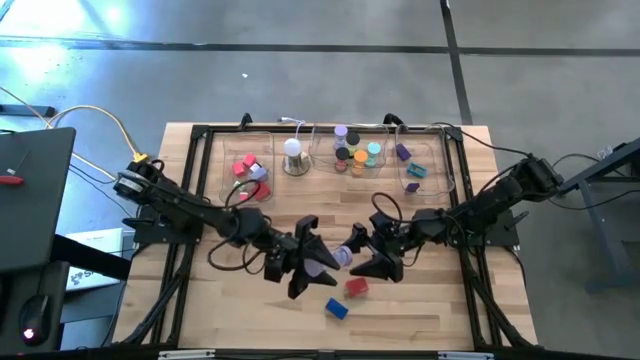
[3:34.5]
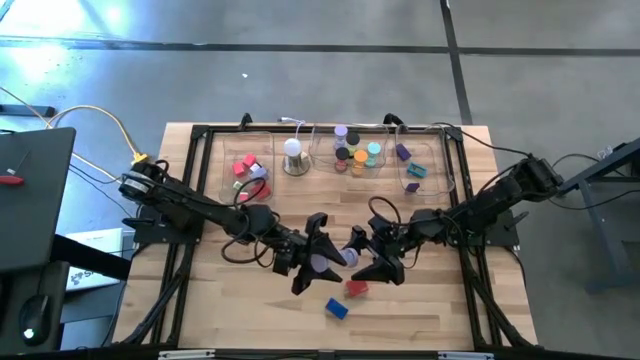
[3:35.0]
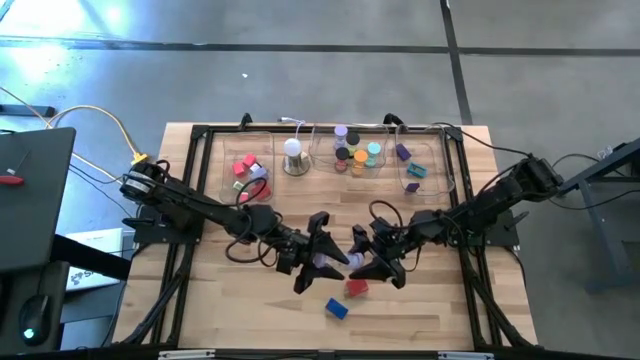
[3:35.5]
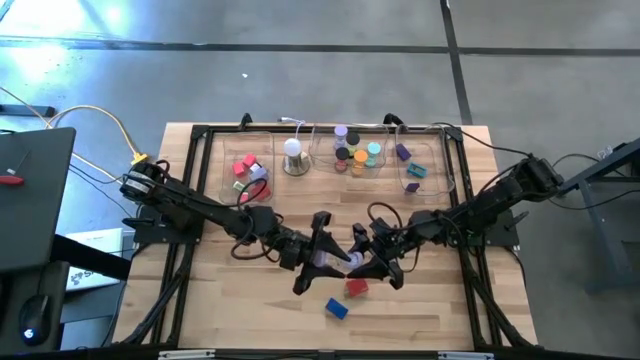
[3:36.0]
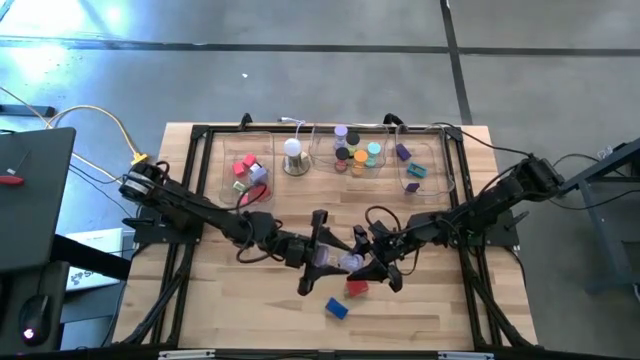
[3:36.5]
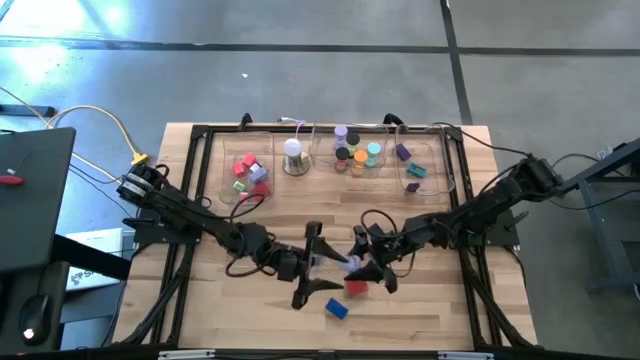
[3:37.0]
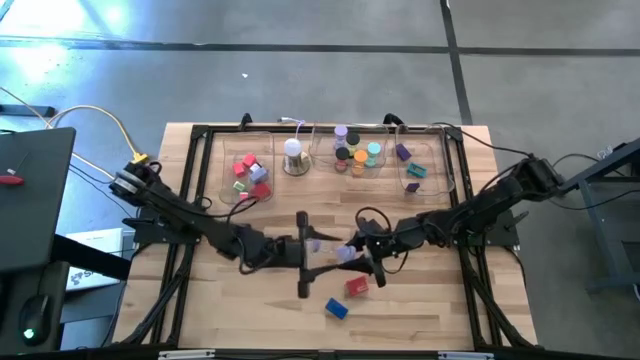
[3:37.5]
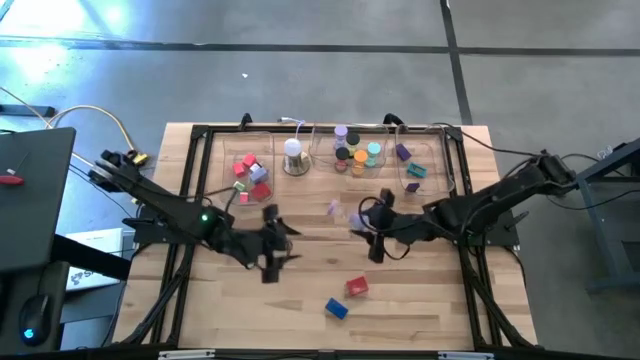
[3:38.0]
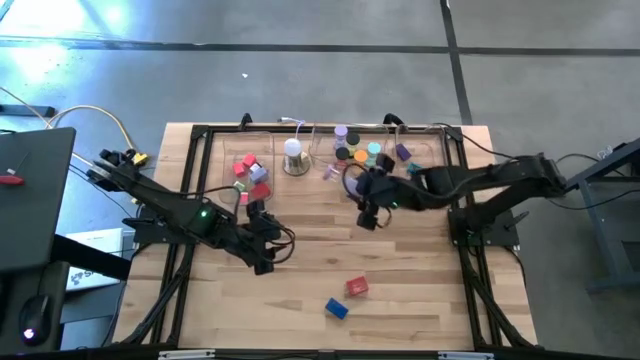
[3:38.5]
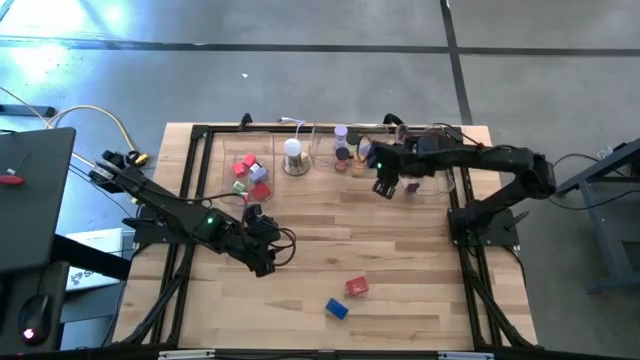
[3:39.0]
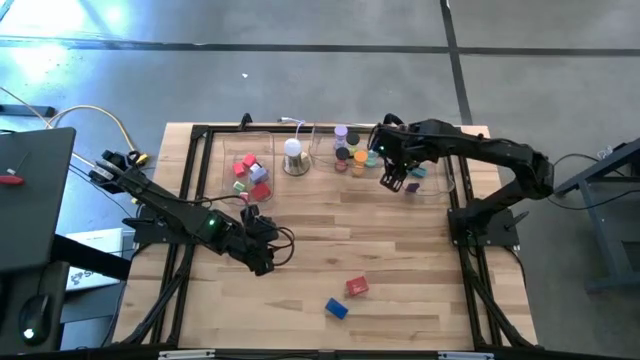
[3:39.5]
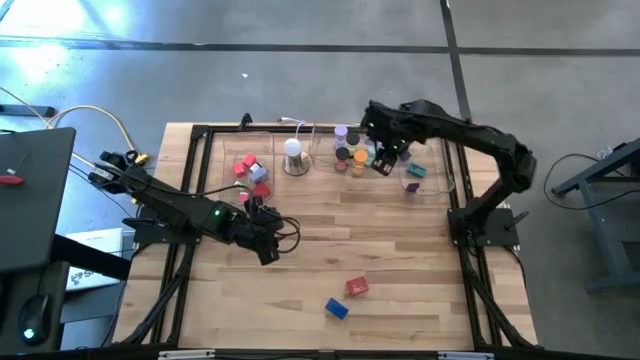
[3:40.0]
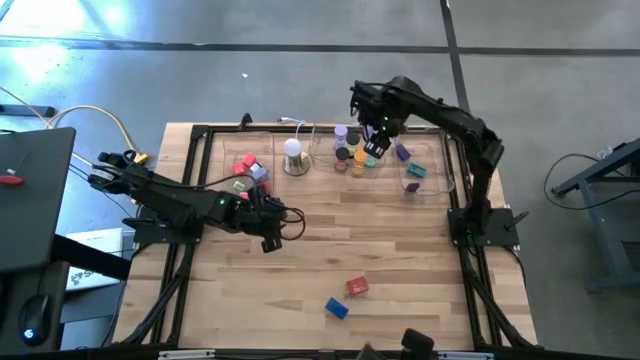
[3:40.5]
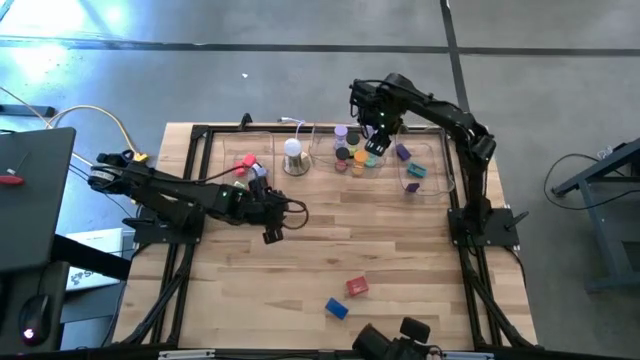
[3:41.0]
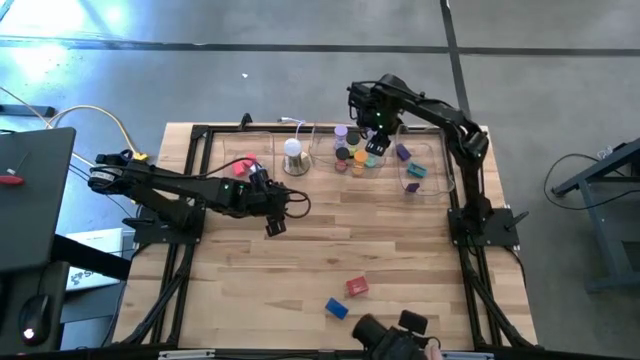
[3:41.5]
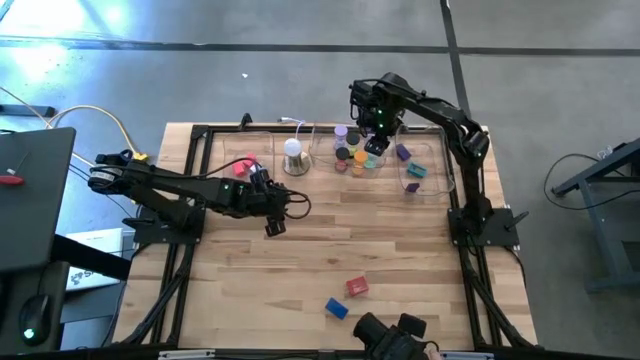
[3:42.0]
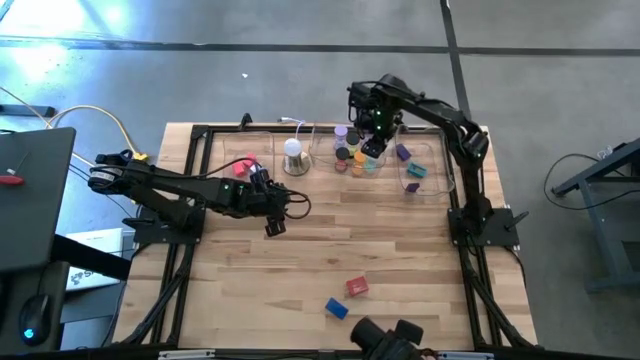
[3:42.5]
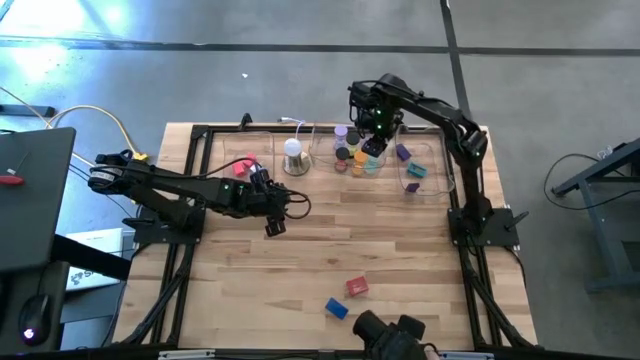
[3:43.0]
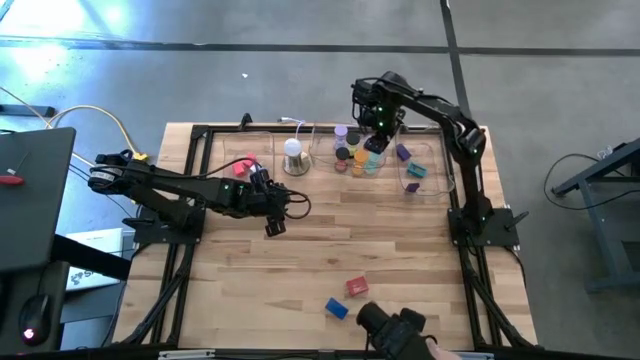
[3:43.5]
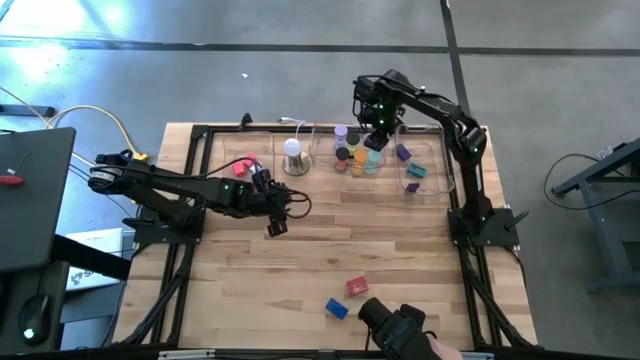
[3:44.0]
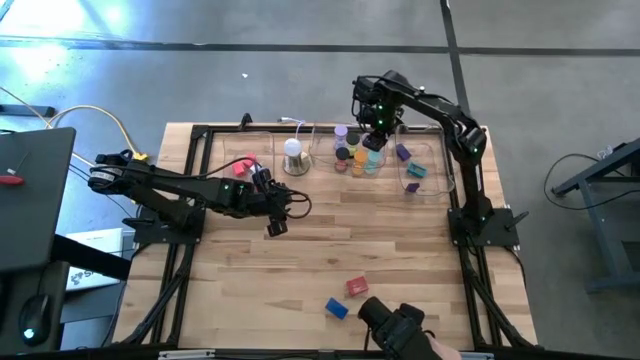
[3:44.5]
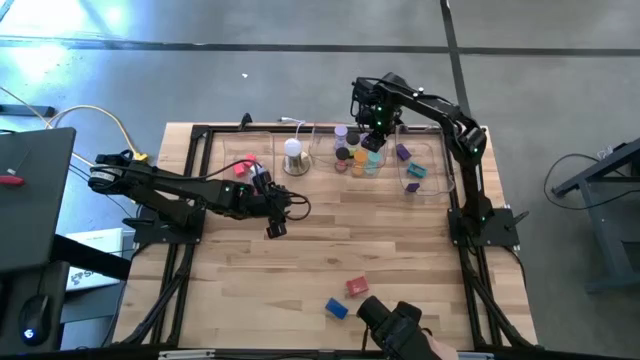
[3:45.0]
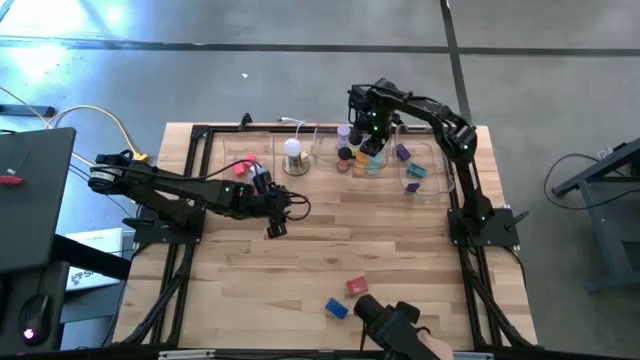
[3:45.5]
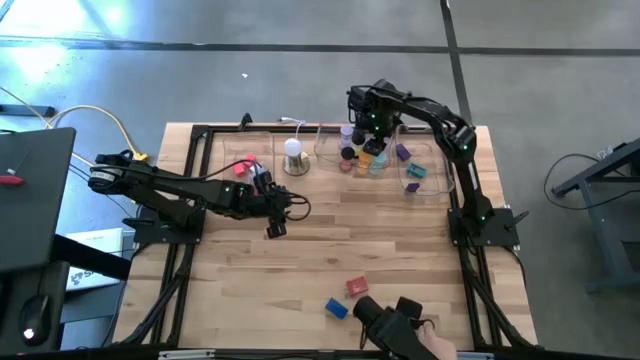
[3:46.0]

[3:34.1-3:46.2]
Task: Pick & Place Office items
Put the purple hourglass into the middle transparent bin

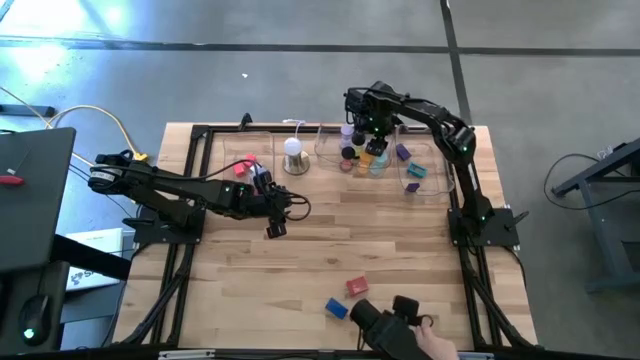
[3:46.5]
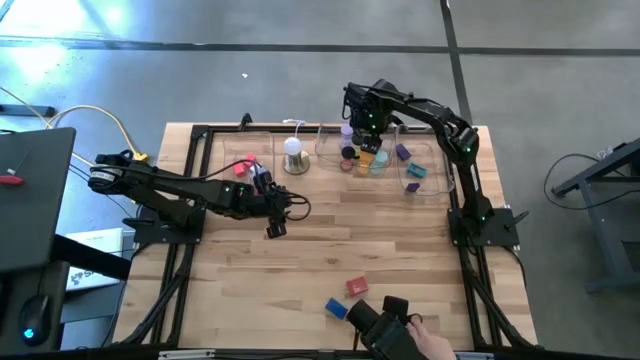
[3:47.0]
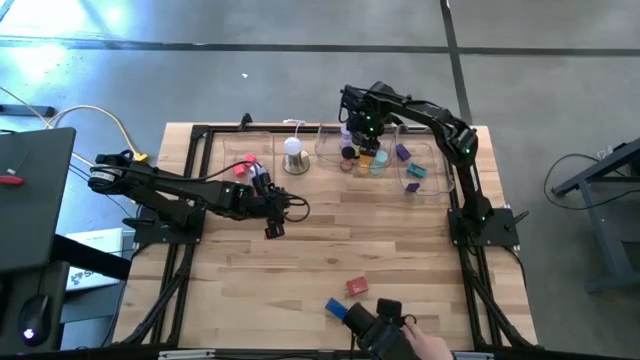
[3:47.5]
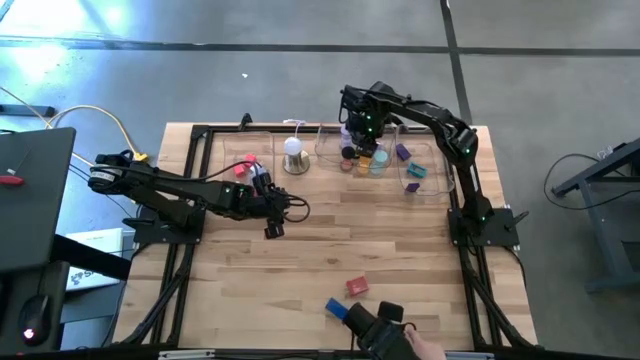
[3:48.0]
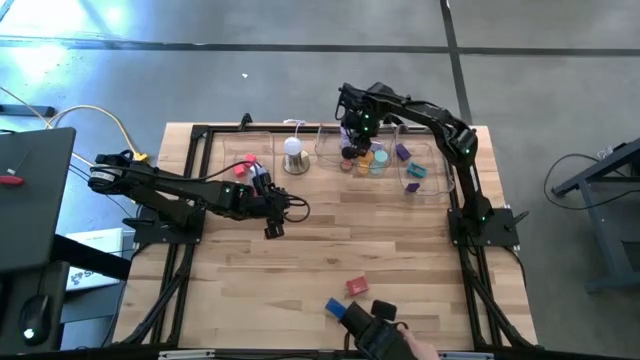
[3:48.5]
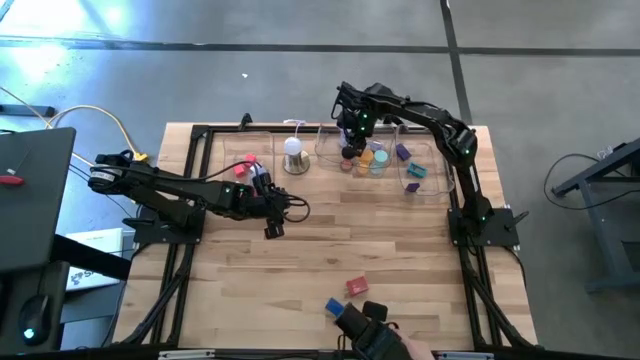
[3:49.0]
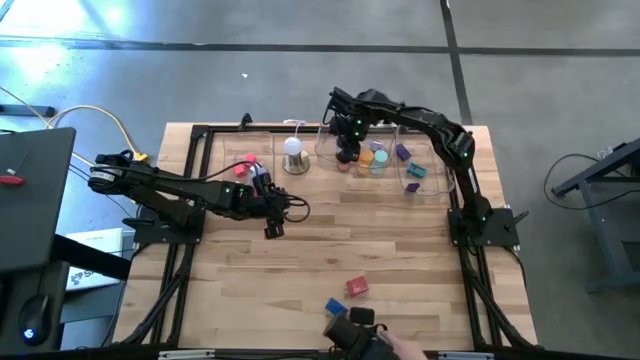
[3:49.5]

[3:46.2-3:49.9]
Adjust the green hourglass on the middle transparent bin

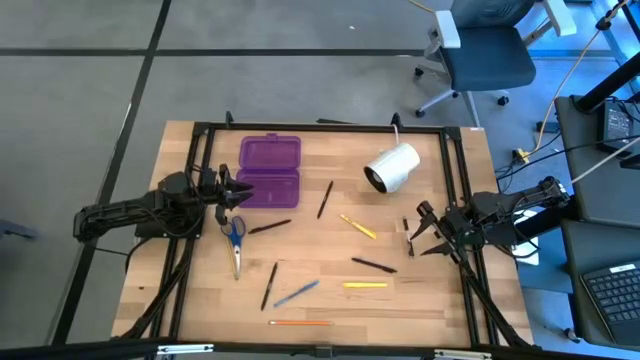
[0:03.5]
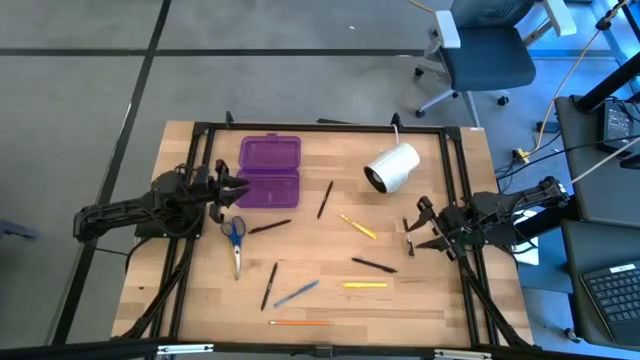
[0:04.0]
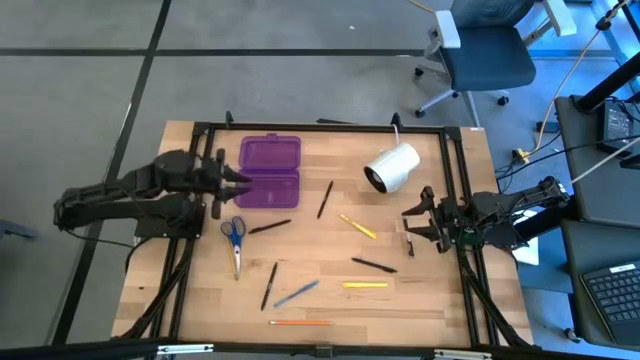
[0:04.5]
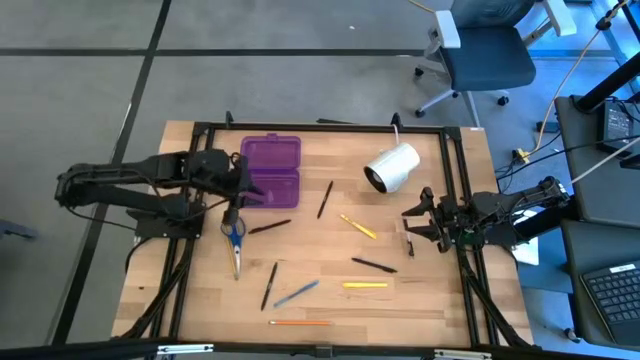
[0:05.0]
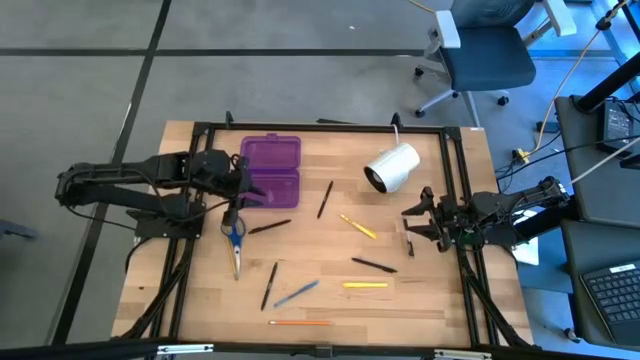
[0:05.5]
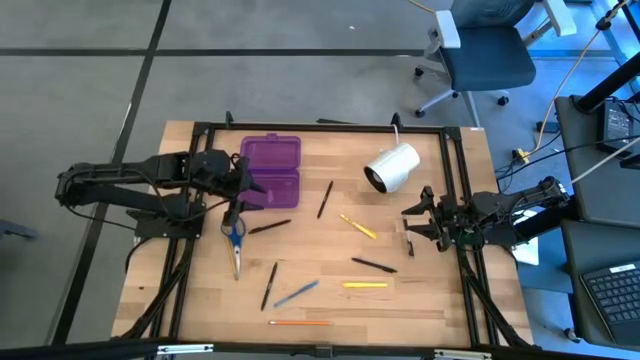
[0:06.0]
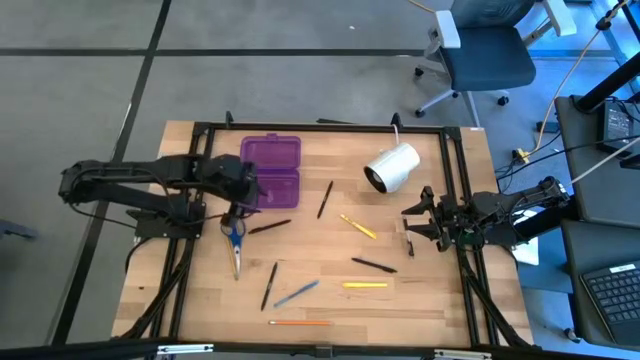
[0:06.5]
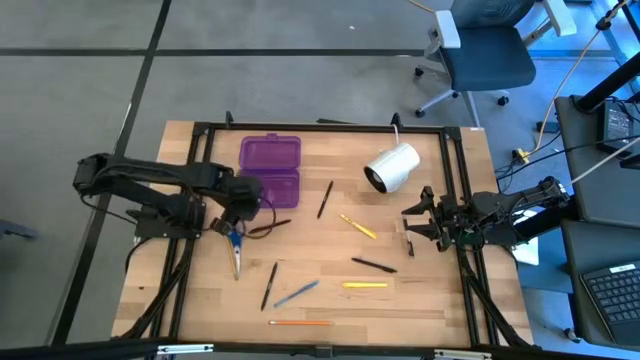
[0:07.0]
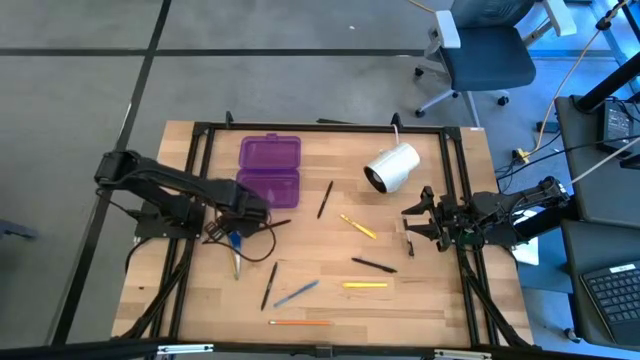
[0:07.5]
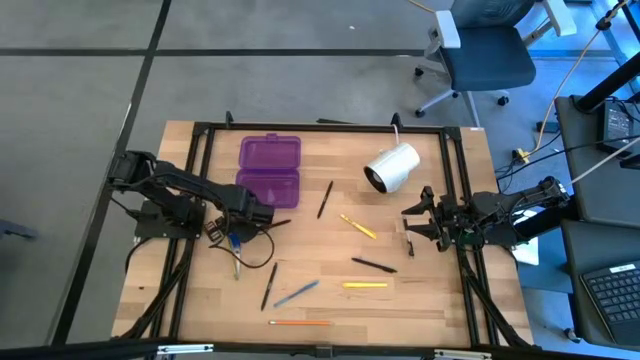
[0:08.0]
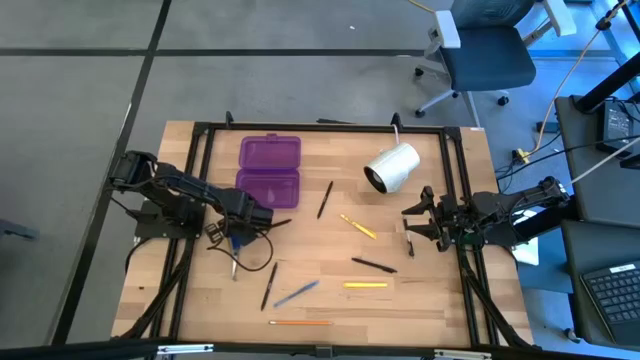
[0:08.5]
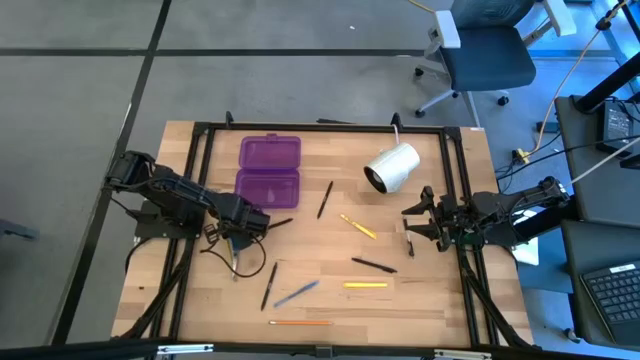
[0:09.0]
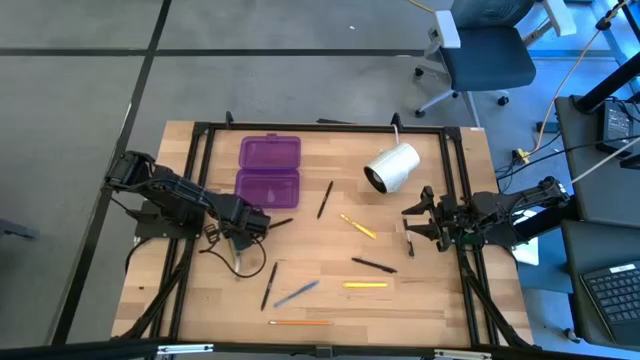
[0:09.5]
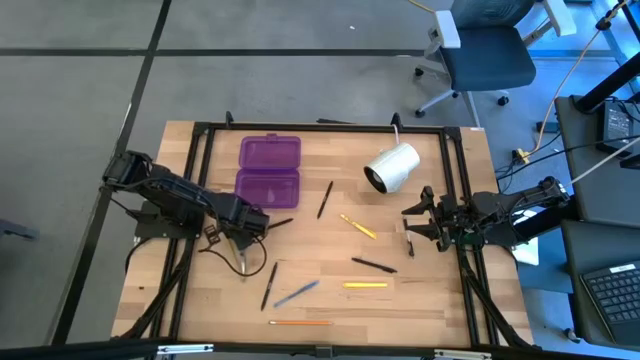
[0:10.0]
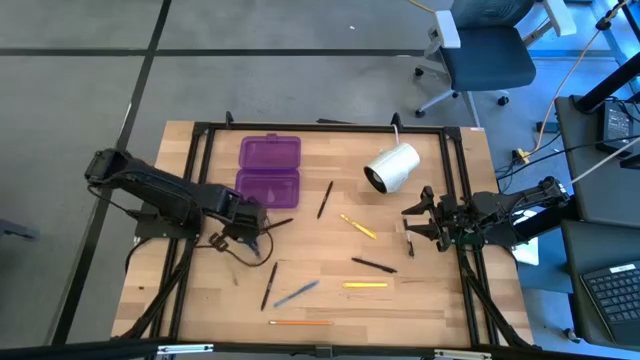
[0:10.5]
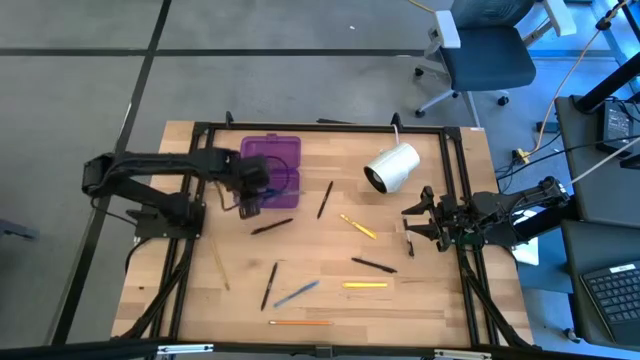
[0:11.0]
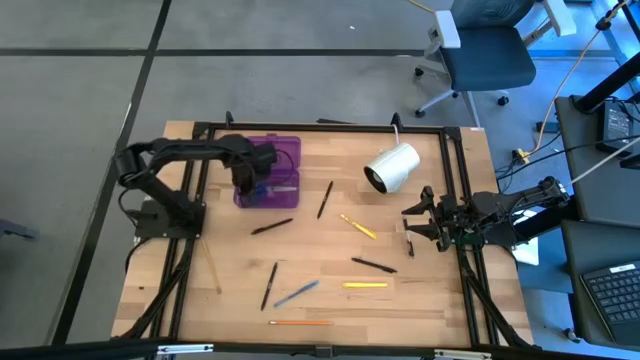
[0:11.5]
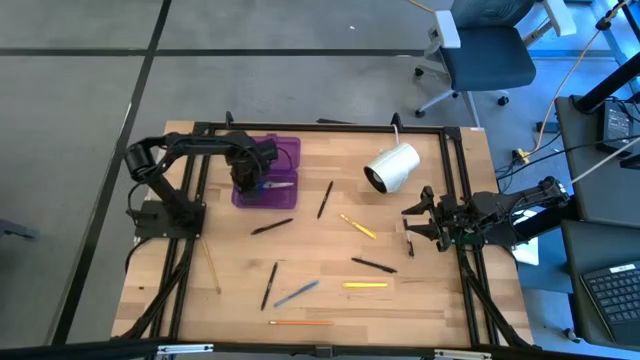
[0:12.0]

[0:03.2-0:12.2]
Task: Pick & place school supplies into a supply box
Put the blue scissors into the purple box organizer
